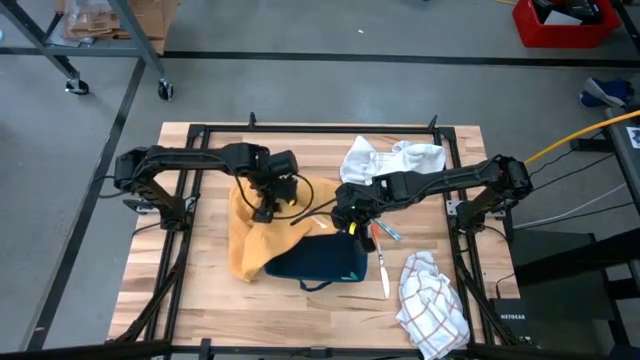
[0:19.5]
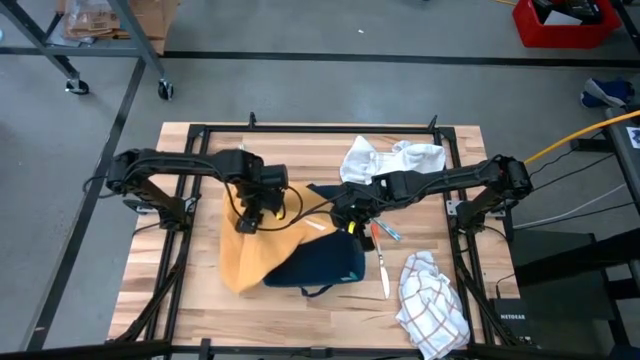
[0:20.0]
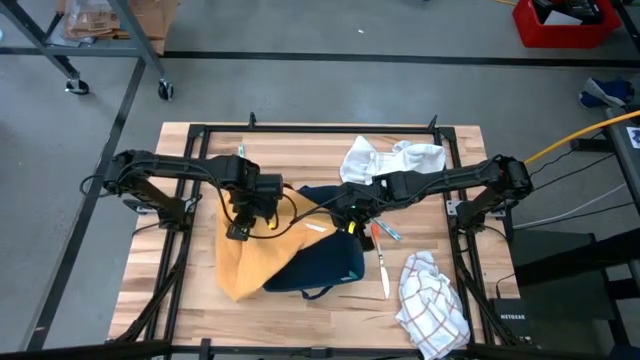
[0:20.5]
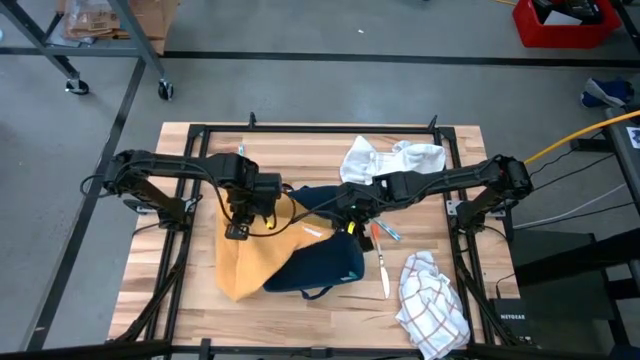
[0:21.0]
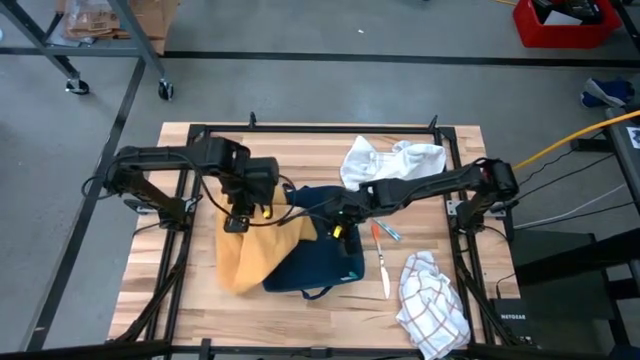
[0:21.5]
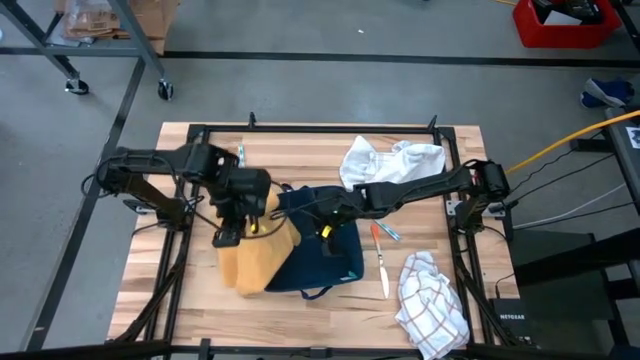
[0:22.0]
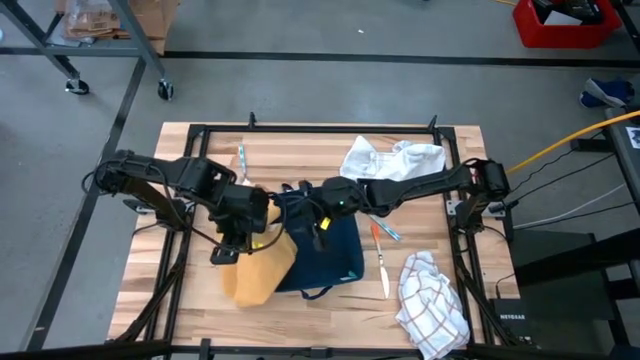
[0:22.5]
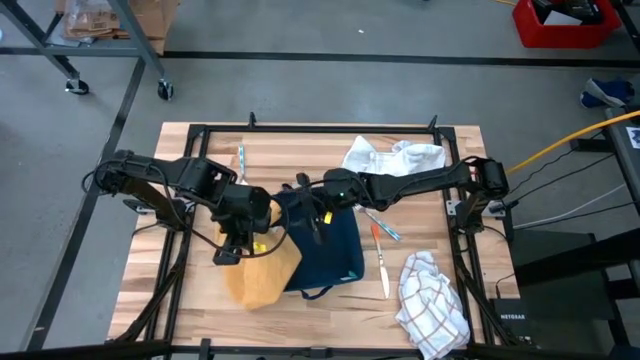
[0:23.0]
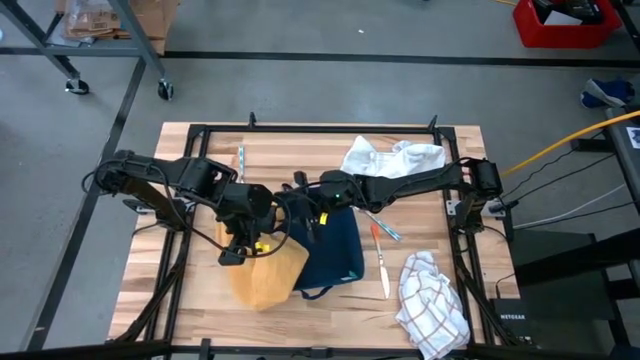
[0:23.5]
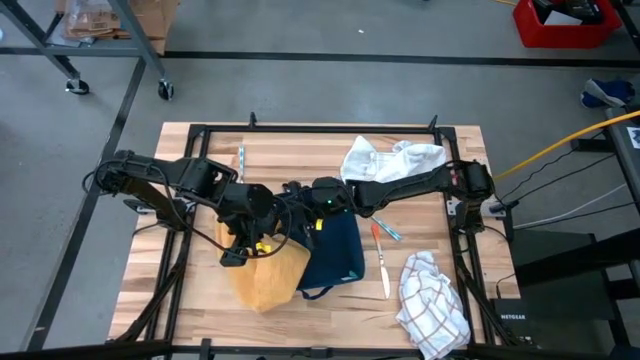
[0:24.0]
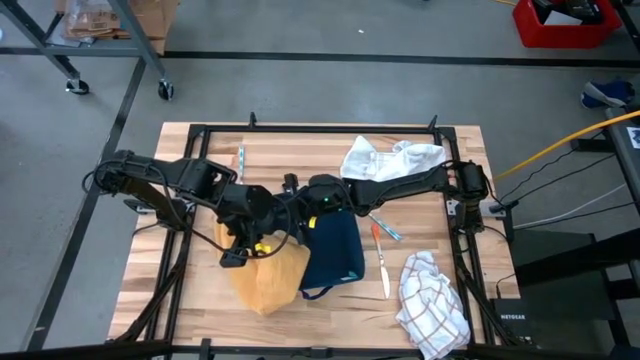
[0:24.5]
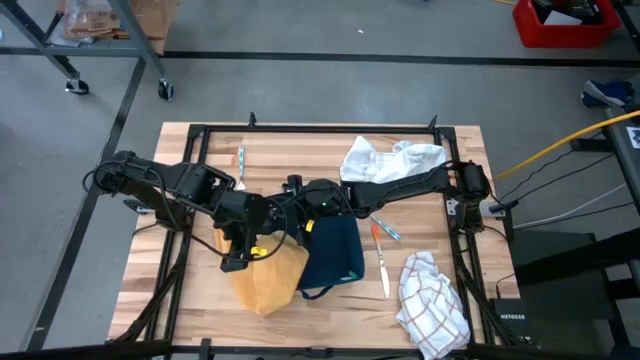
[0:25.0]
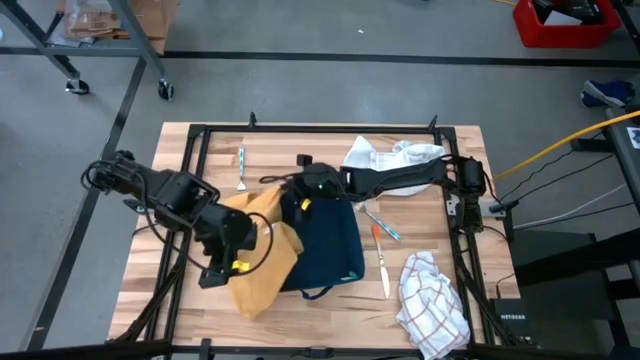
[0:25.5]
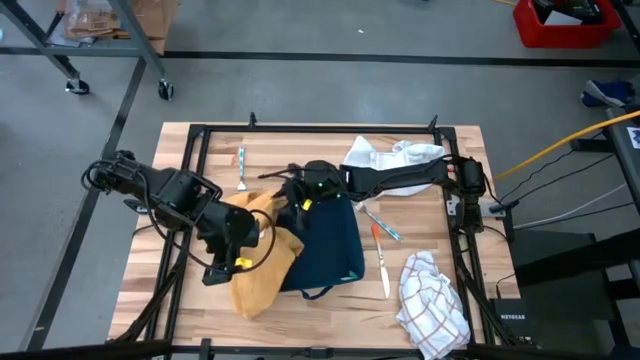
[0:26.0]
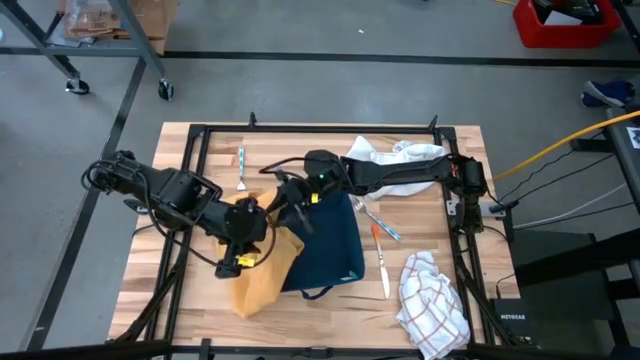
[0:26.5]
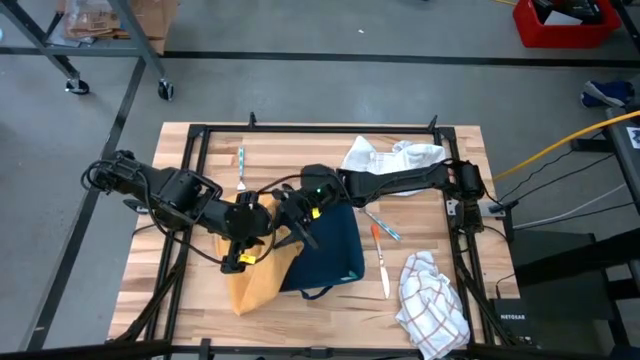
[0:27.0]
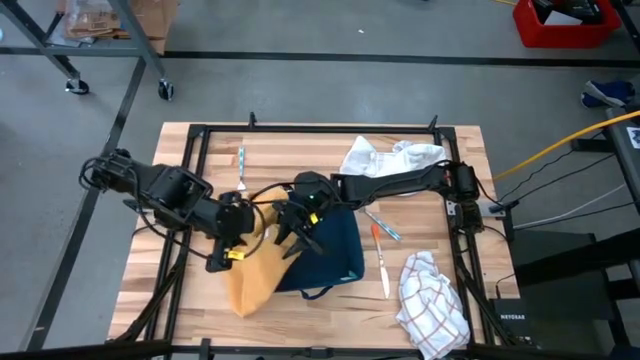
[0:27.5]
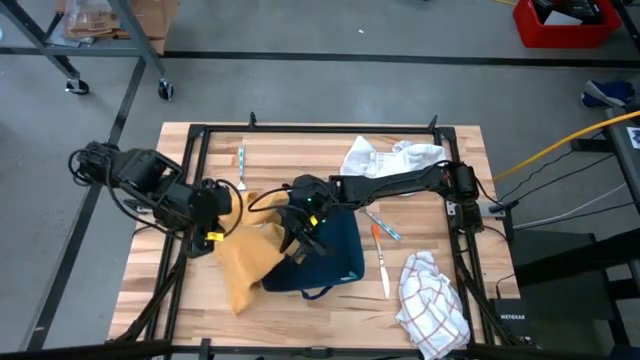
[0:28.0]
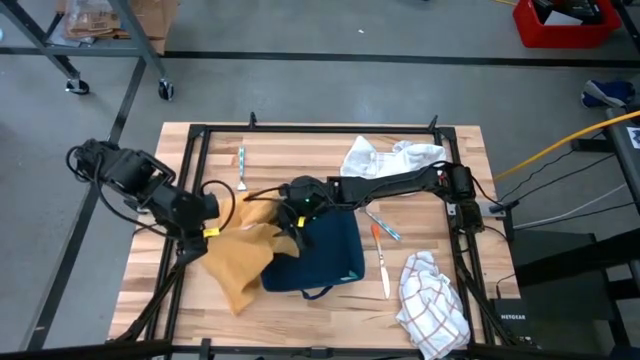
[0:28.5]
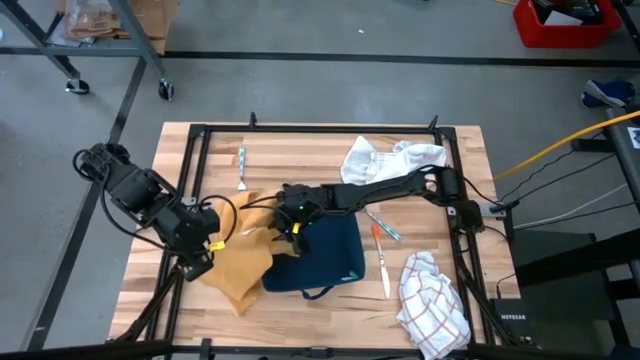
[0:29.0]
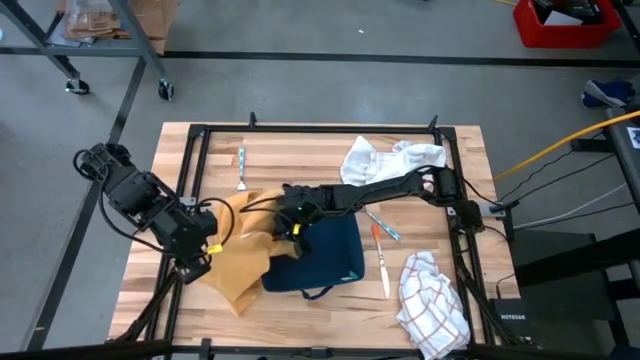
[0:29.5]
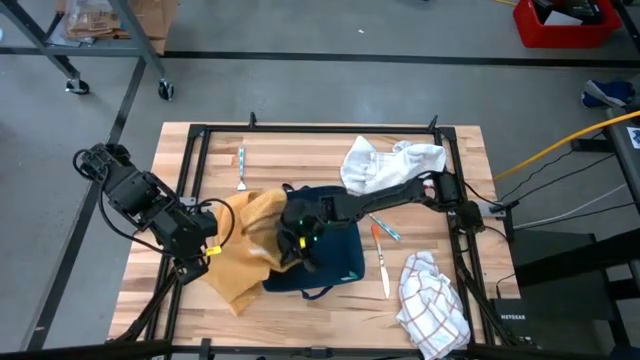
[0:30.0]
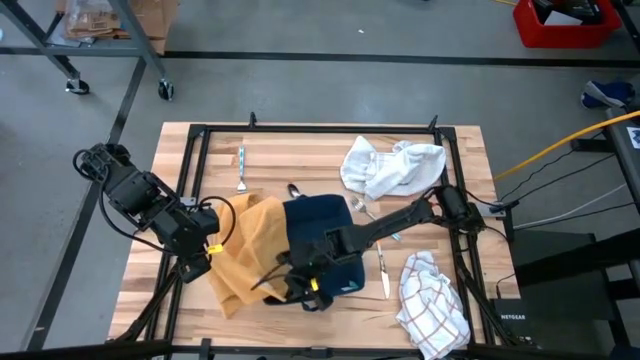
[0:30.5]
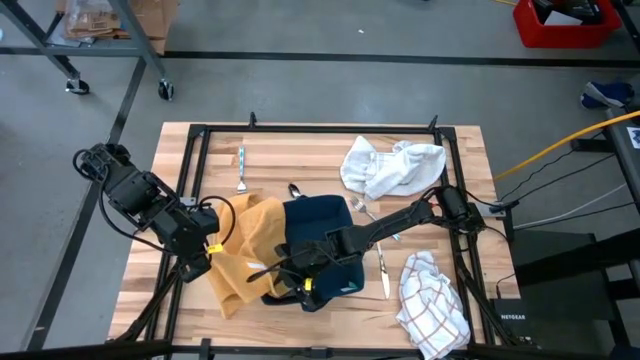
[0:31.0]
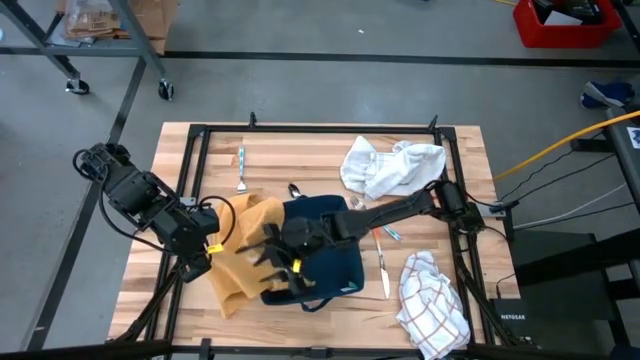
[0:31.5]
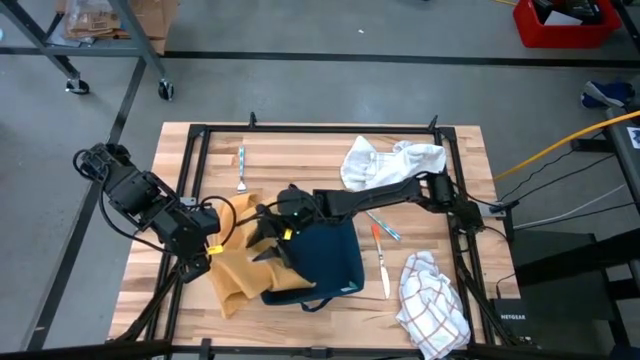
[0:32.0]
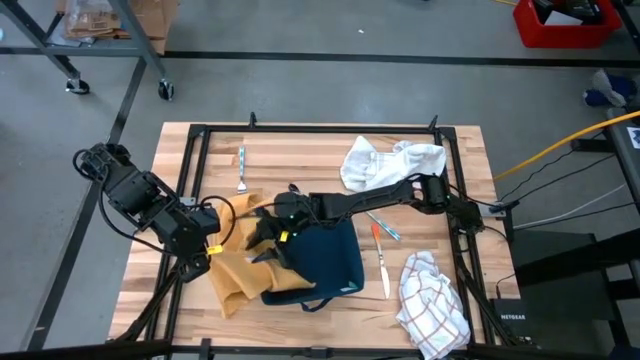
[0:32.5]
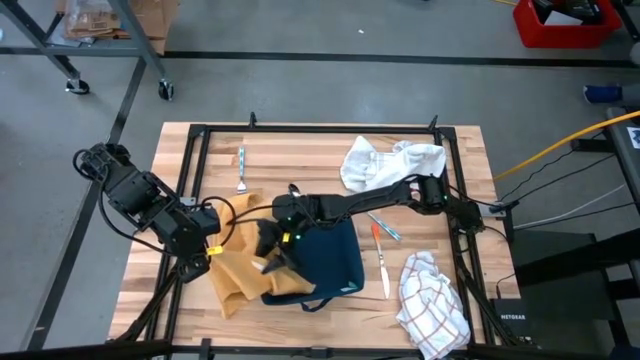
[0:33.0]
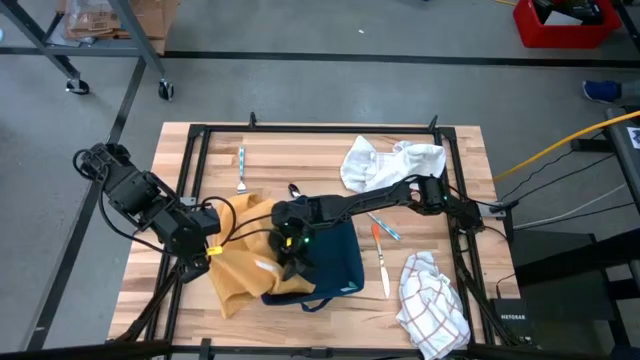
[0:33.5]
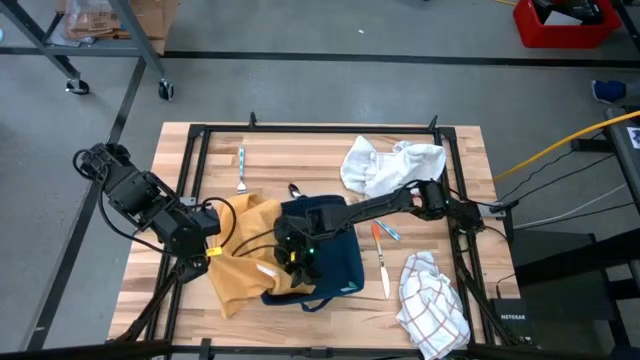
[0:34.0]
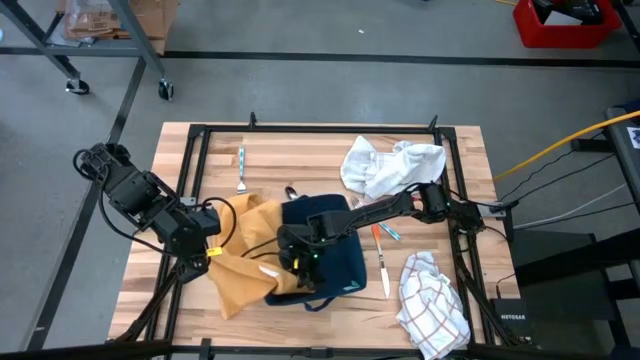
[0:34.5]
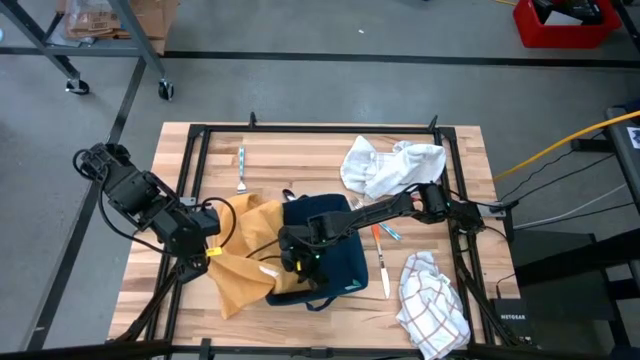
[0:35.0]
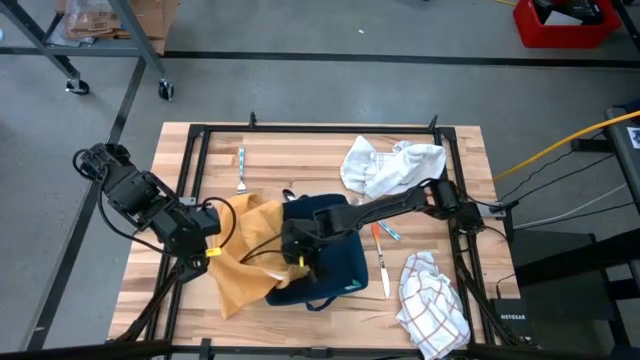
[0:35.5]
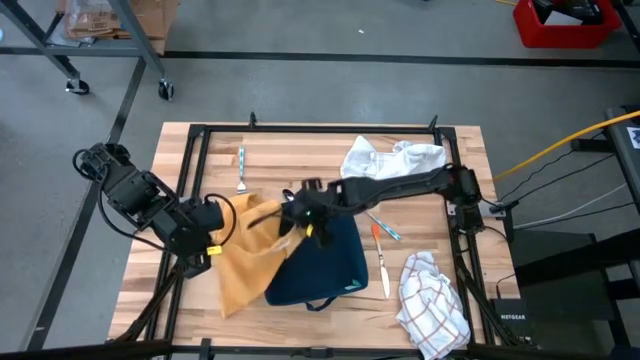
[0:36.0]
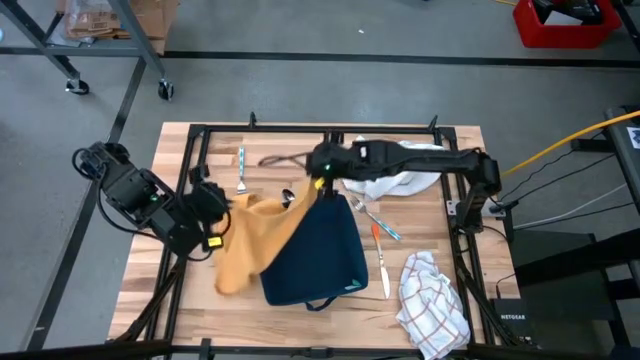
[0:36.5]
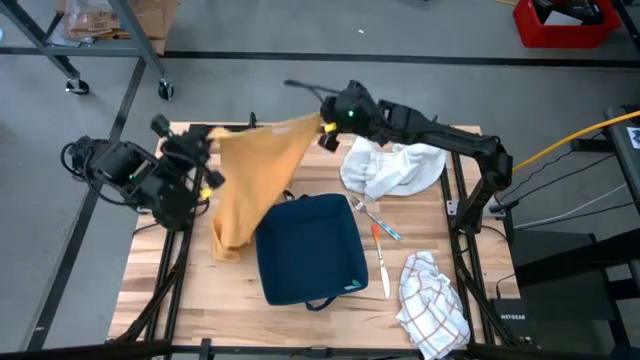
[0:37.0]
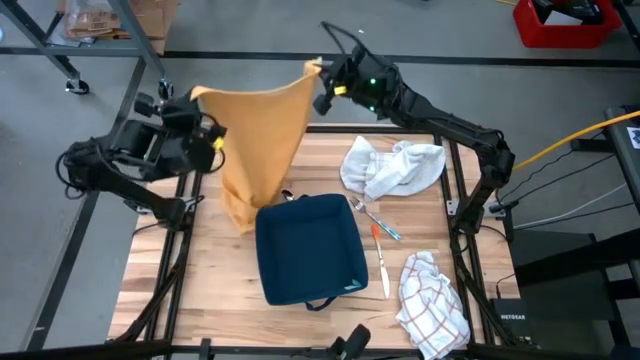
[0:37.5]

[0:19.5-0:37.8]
Task: Fold towel
Fold the yellow towel

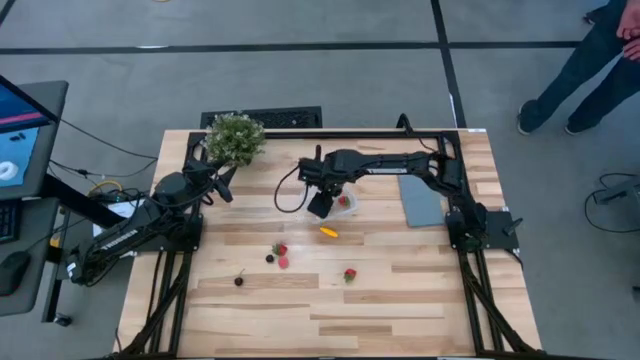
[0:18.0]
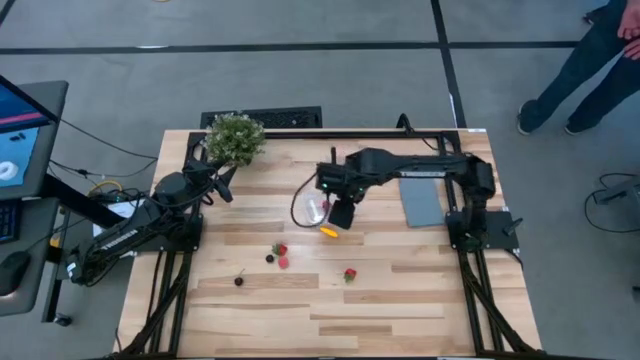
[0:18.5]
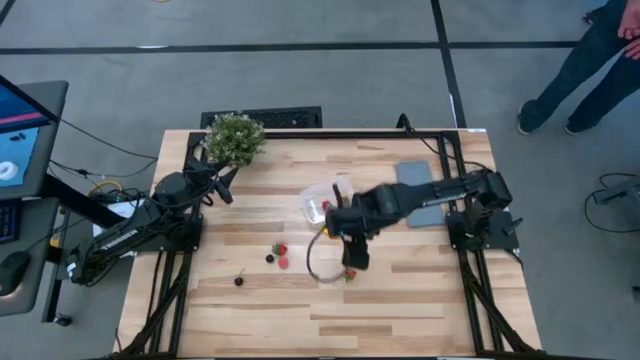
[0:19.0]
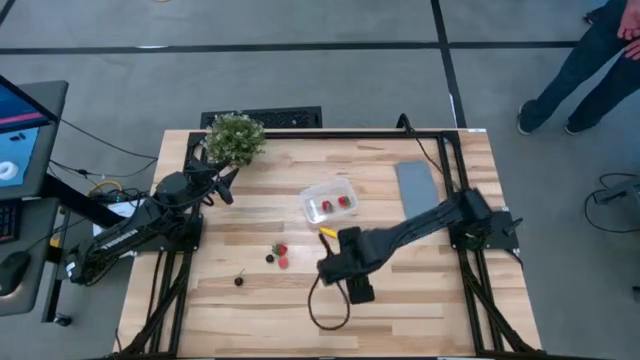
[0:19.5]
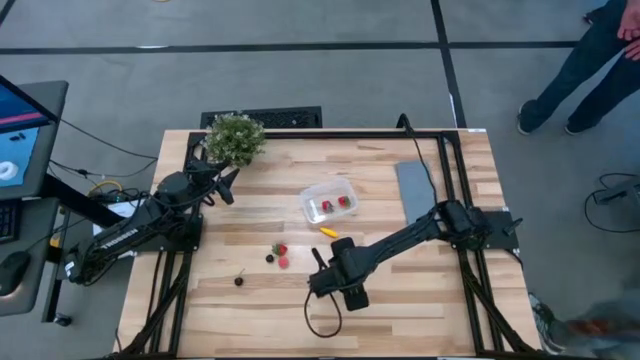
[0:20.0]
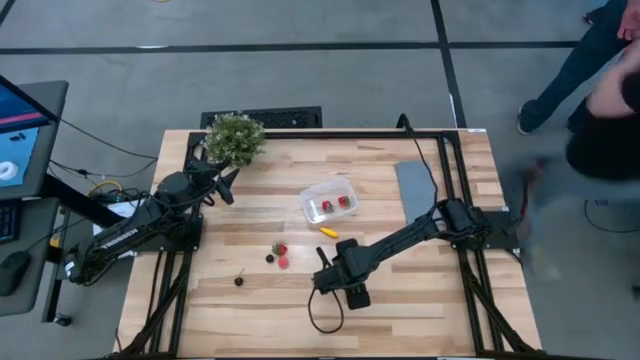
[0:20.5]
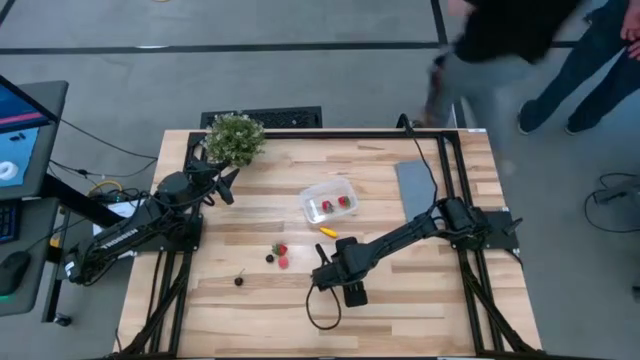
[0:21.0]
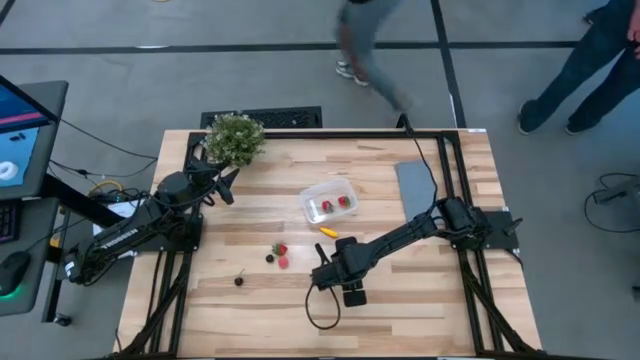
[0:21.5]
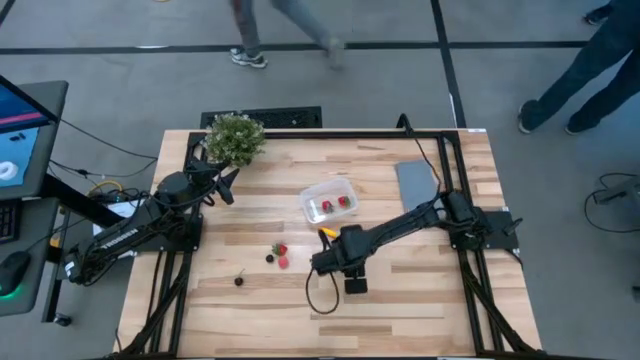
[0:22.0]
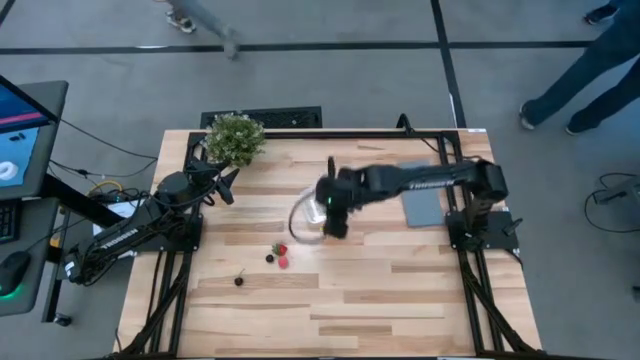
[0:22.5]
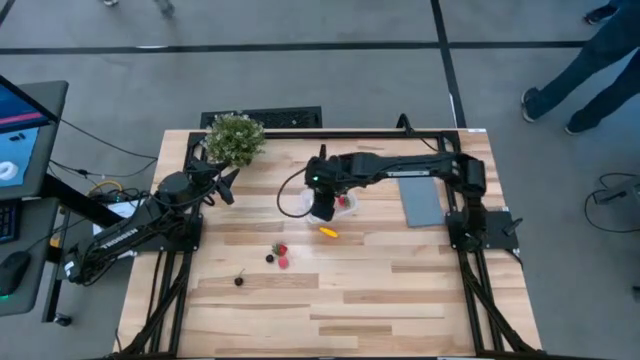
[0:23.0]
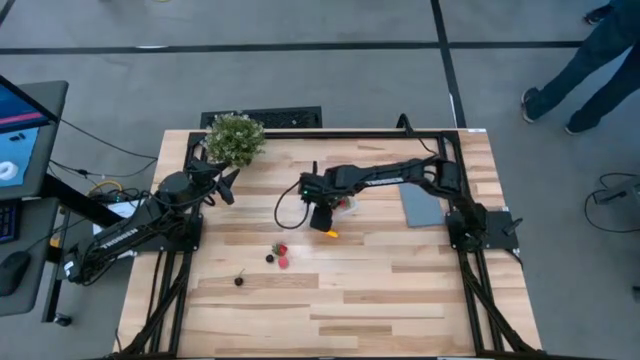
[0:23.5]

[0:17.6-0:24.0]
Task: Pick and placing Produce into tupperware
Put the strawberry into the transparent bin
